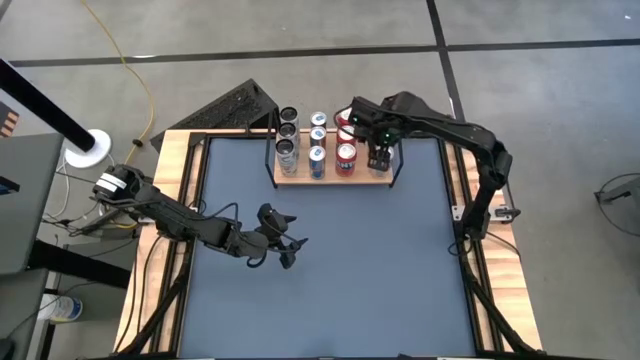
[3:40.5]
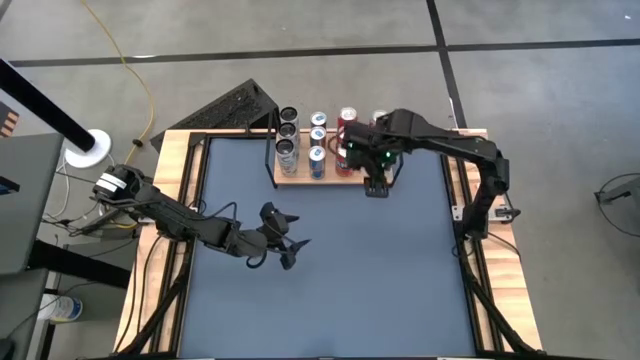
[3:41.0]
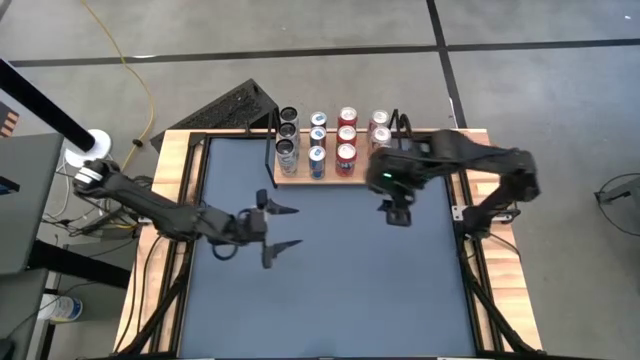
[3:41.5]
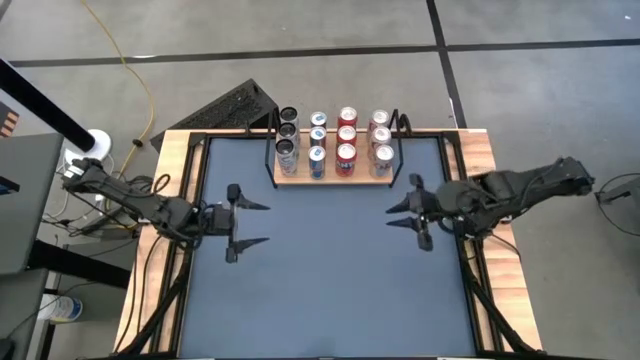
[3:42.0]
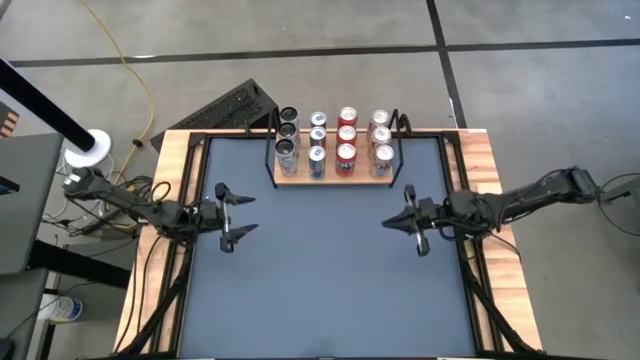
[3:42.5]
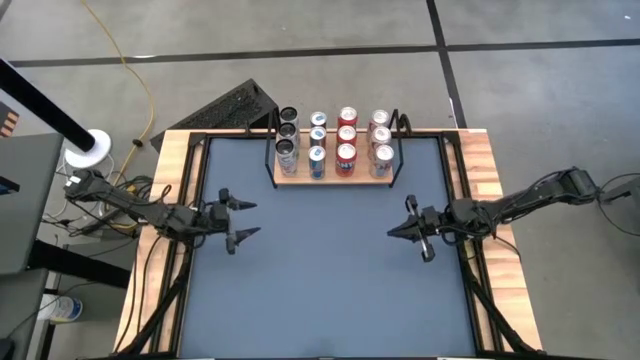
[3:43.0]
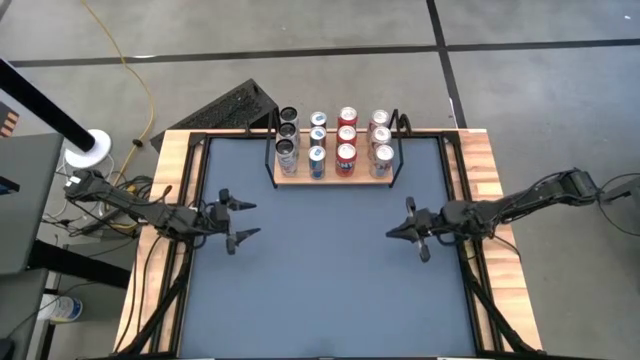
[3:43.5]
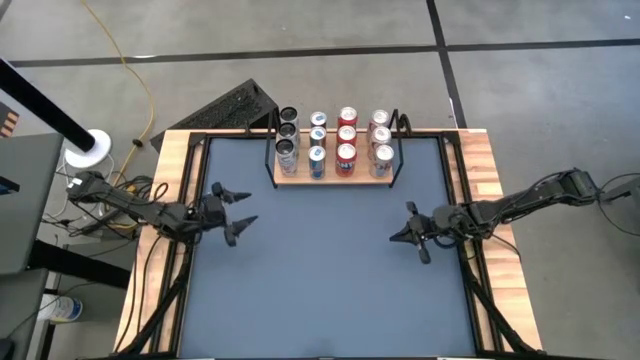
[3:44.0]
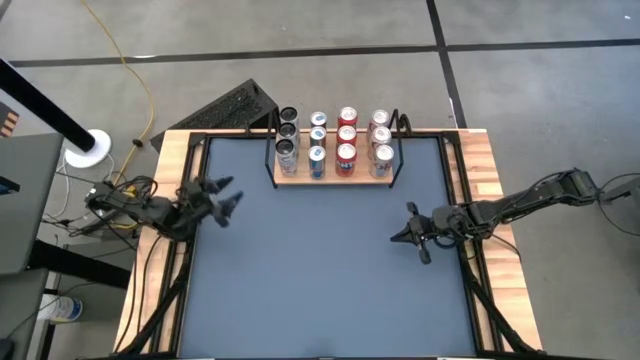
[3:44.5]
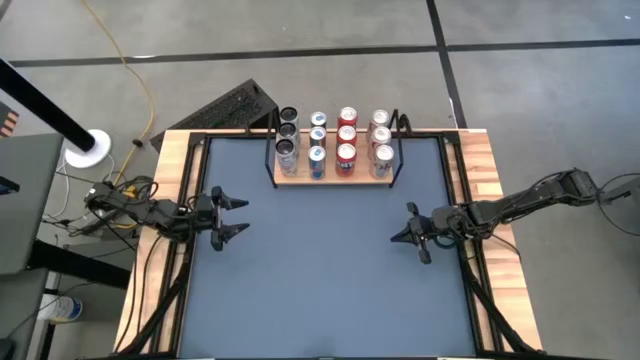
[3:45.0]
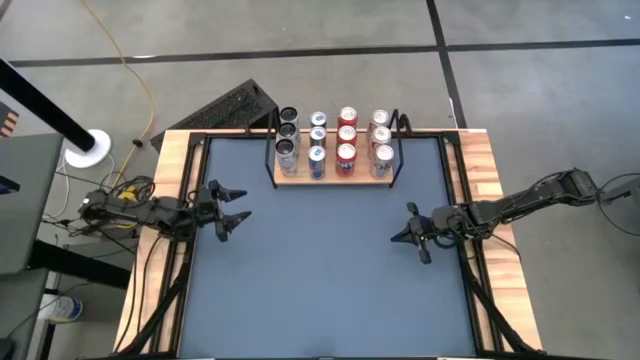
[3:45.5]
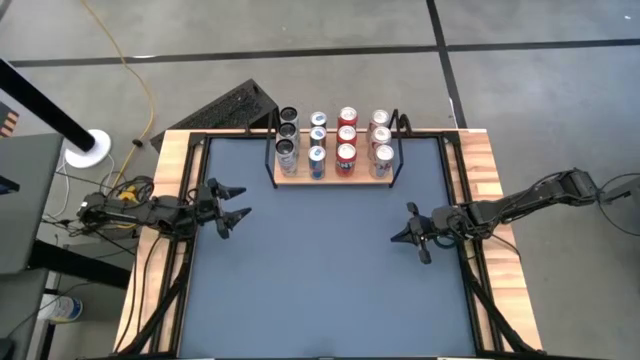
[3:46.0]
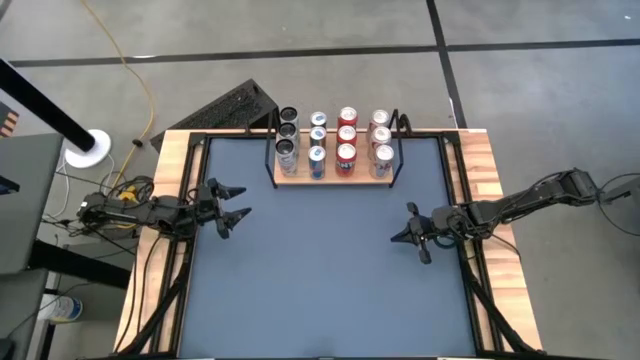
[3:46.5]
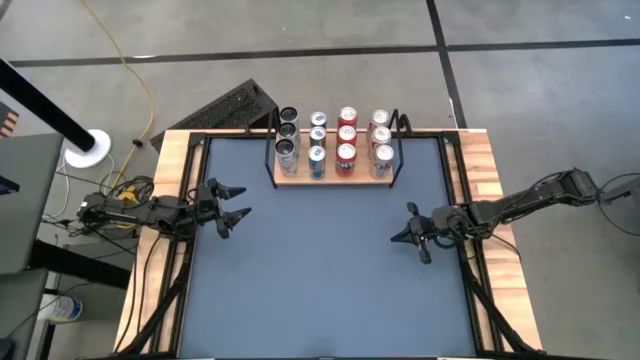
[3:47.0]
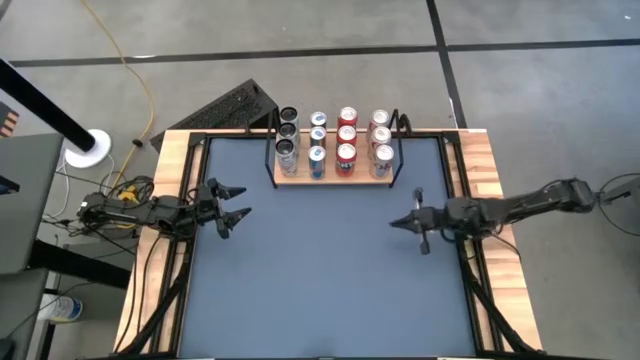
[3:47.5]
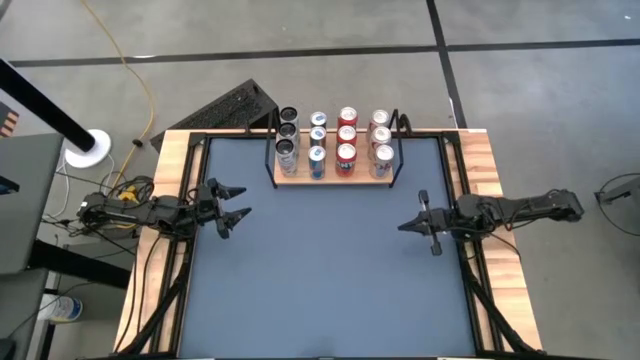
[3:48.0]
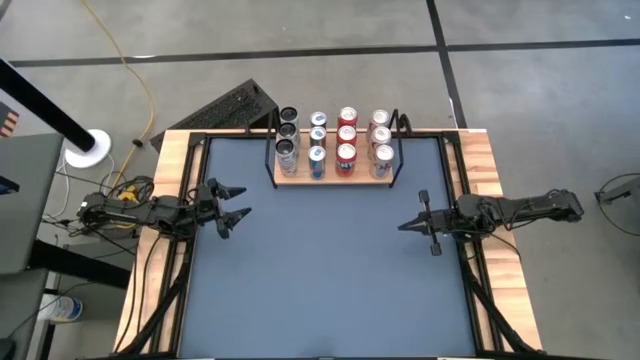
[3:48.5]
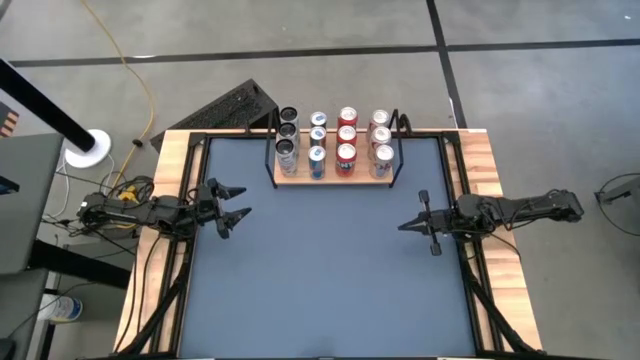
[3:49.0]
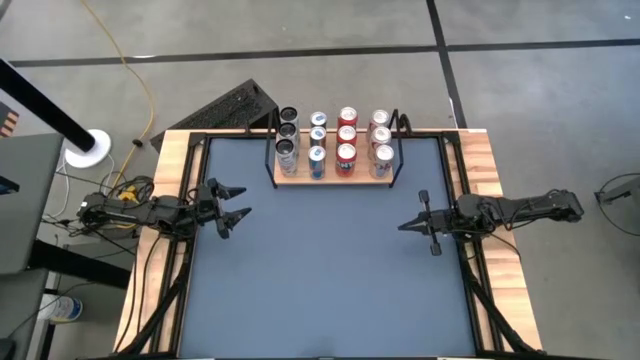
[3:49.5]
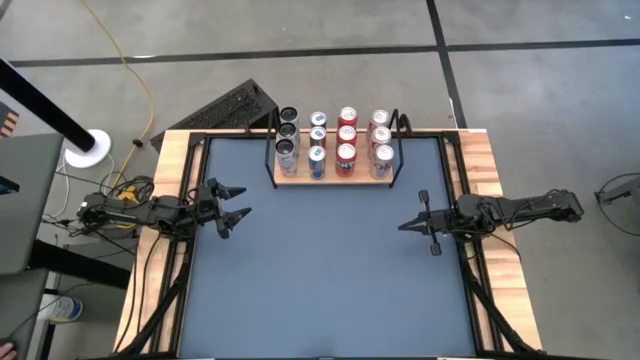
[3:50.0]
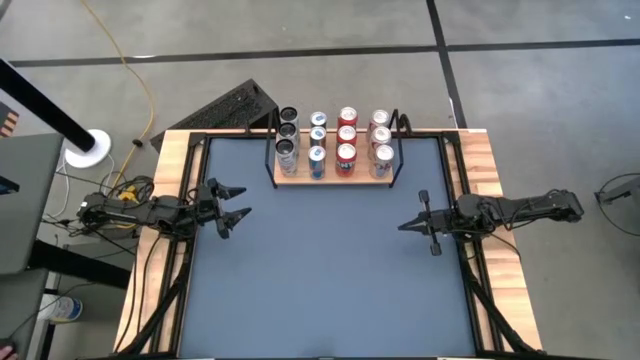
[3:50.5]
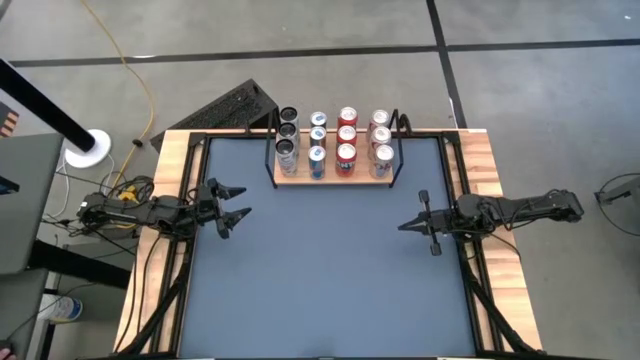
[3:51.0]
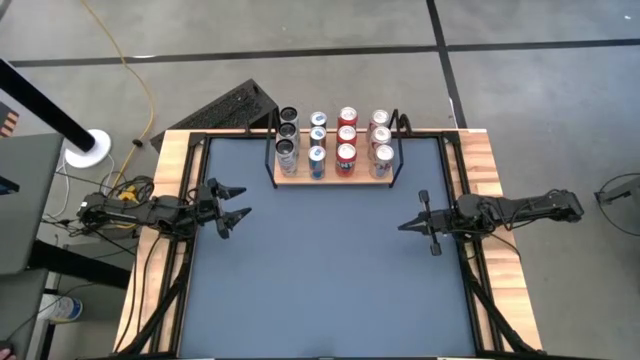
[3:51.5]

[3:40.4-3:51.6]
Task: Place canned beverage on shelf
Return to Home Position

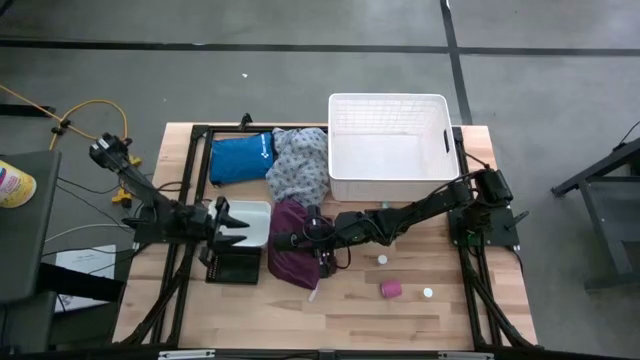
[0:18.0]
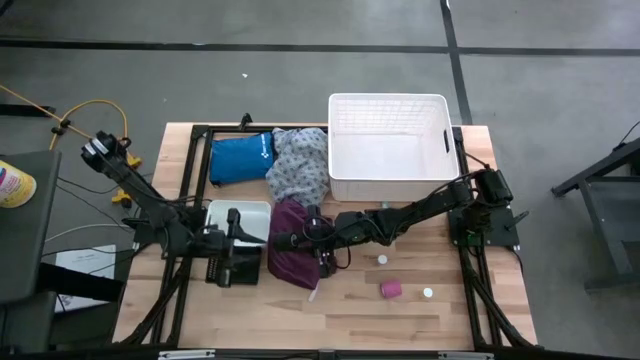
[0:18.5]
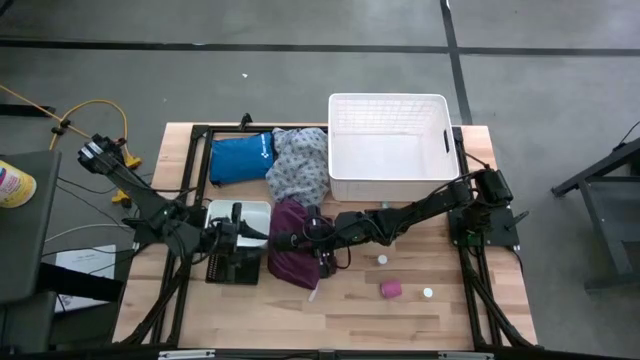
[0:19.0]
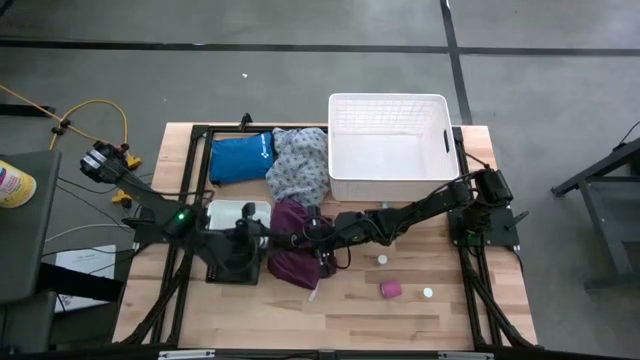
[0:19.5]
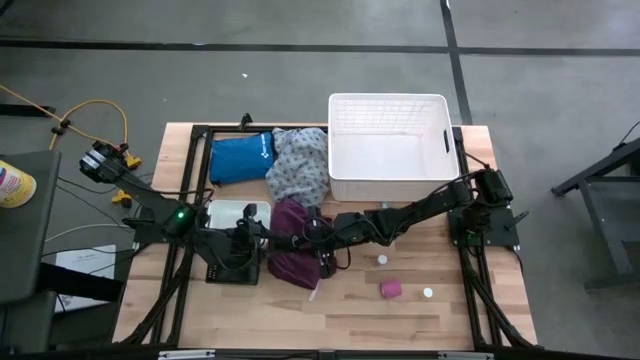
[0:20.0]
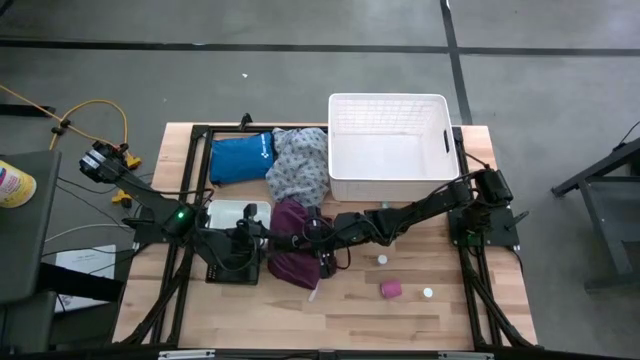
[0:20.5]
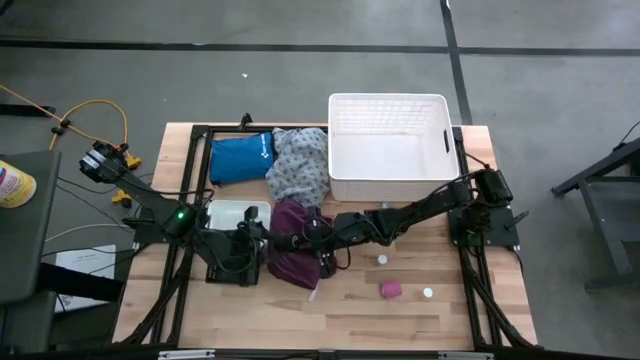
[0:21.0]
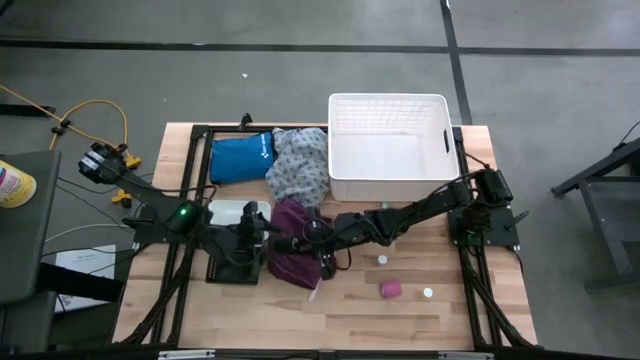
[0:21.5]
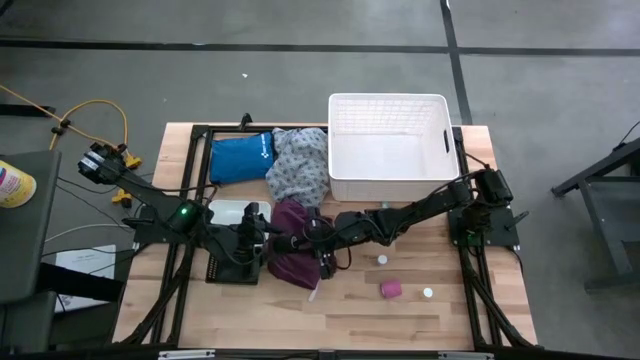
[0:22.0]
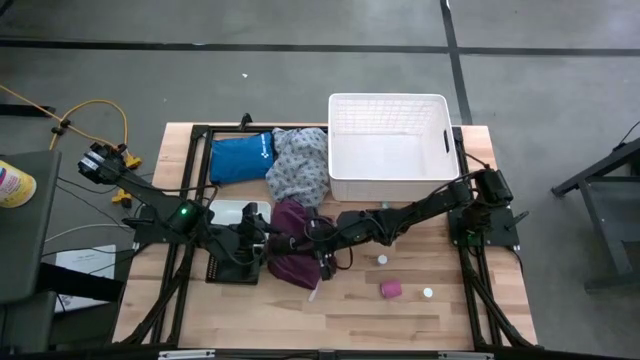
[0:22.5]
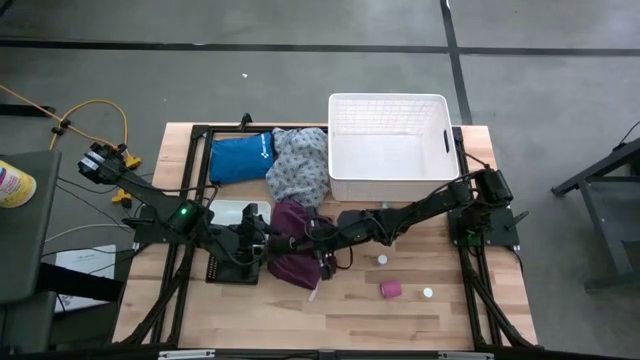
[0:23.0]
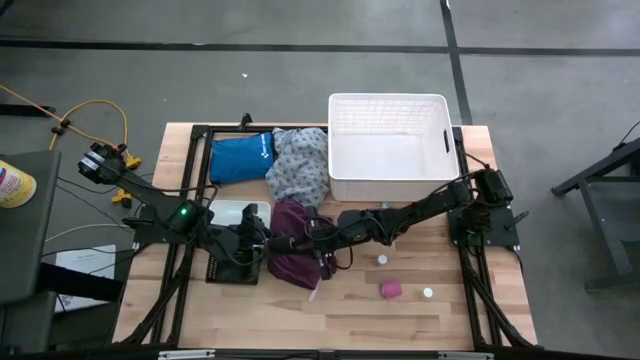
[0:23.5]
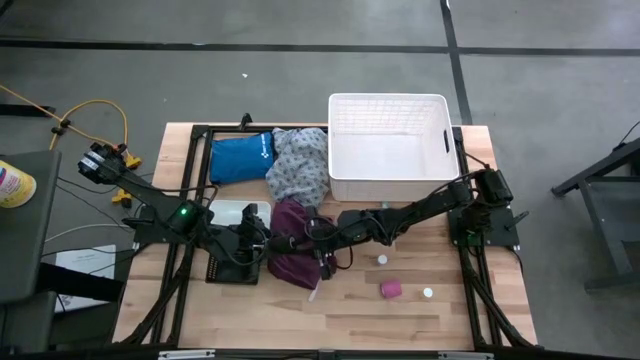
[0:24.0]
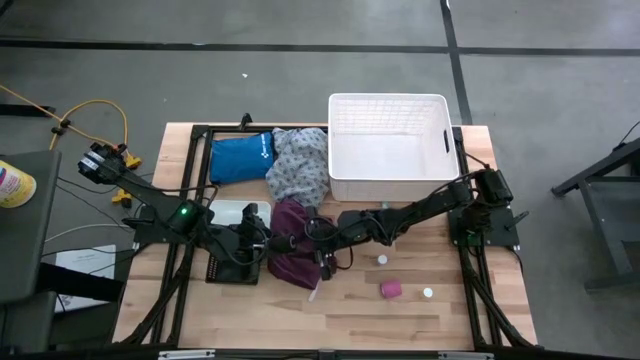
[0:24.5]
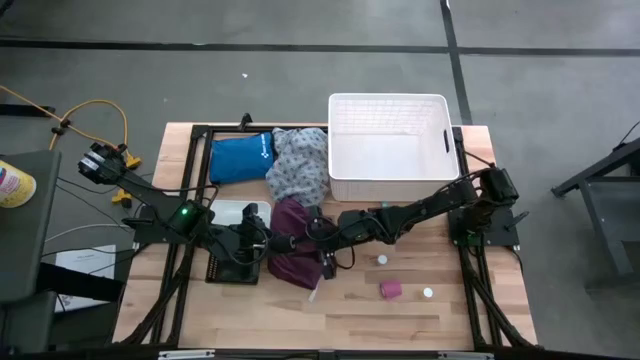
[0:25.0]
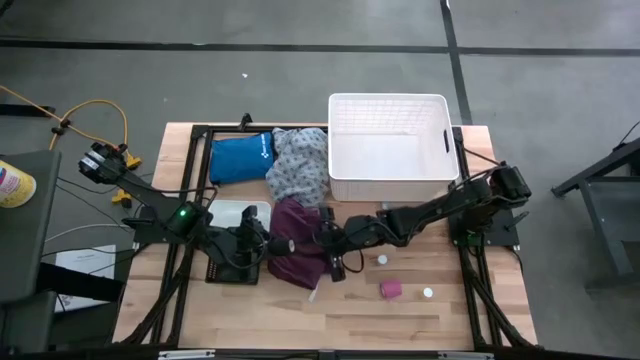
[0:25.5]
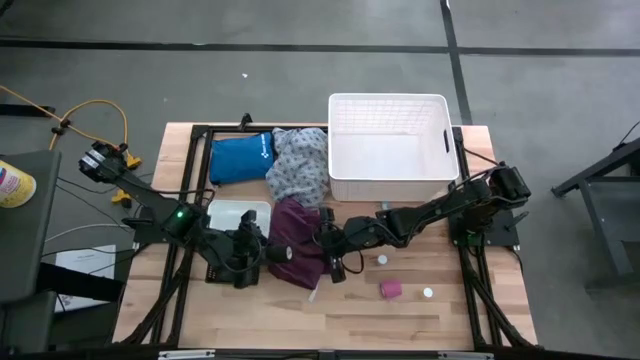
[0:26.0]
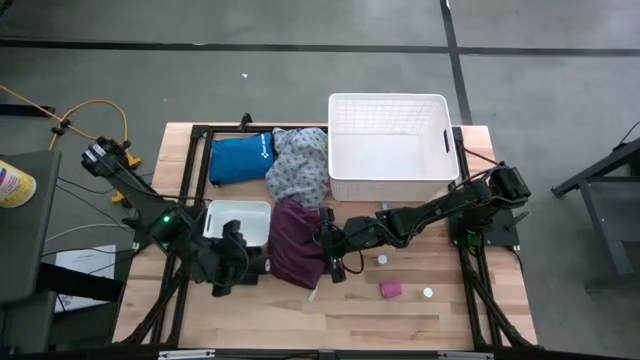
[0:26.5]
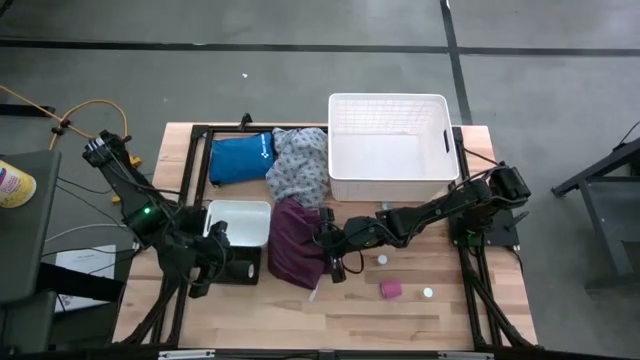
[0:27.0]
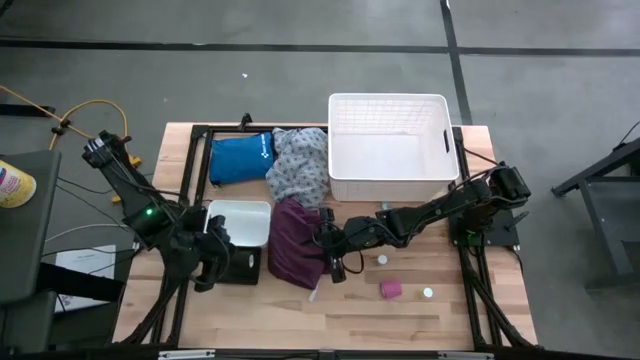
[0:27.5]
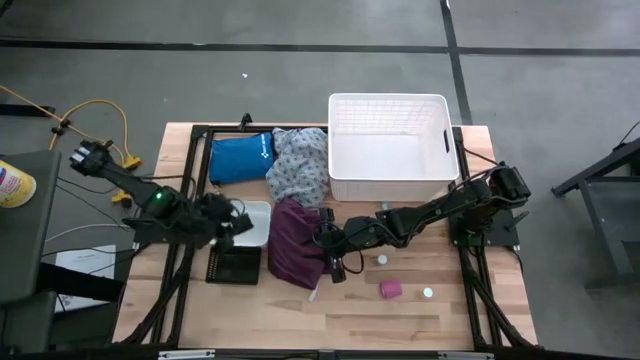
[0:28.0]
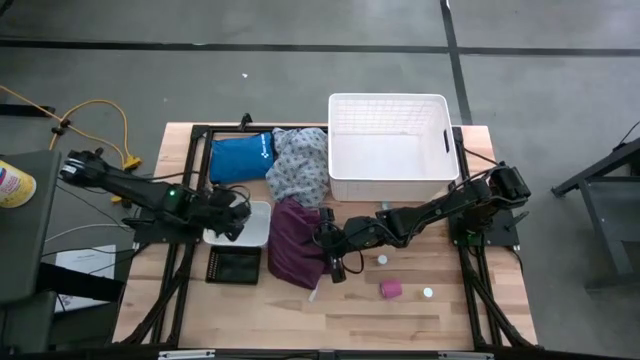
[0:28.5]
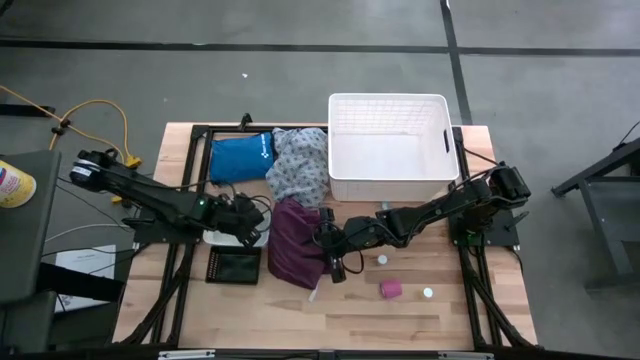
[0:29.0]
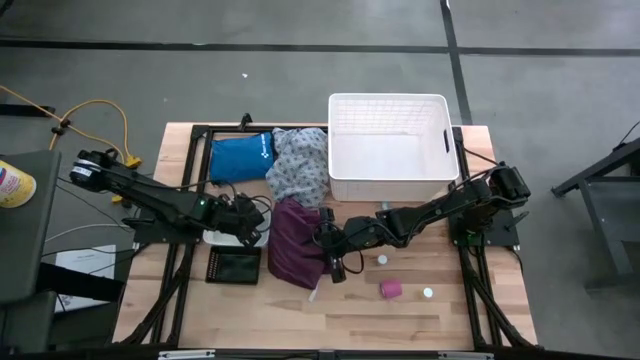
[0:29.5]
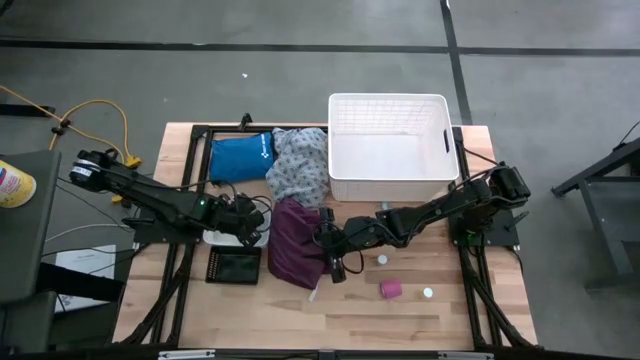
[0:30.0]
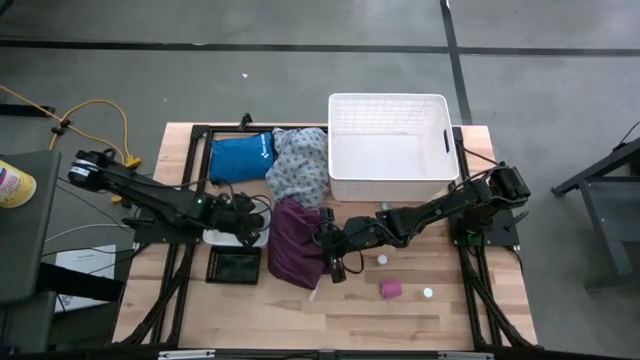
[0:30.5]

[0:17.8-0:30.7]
Task: Pick & place medical supplies in basket/bin
Put the black bandage into the white bin
